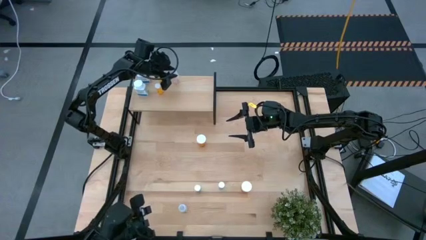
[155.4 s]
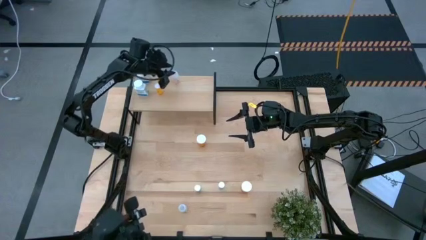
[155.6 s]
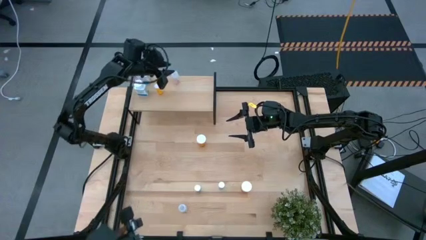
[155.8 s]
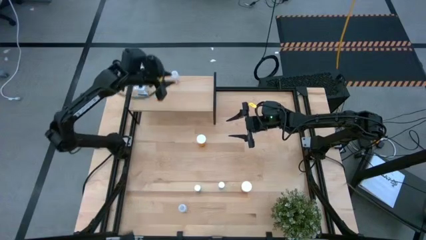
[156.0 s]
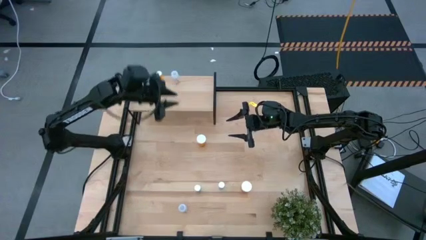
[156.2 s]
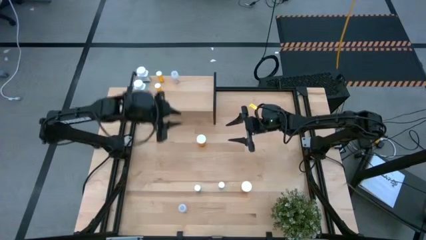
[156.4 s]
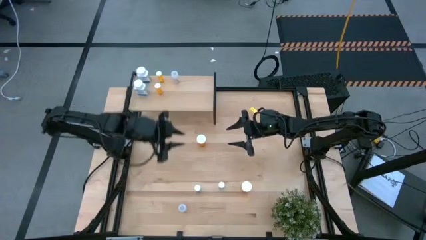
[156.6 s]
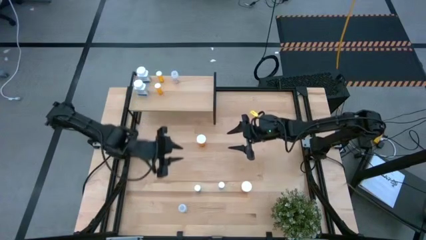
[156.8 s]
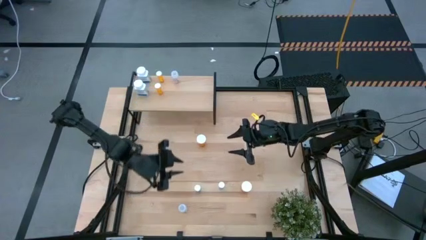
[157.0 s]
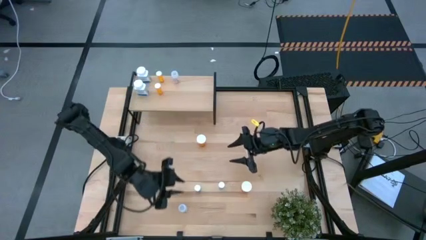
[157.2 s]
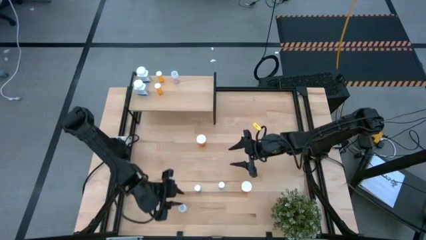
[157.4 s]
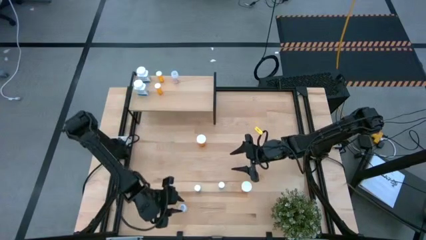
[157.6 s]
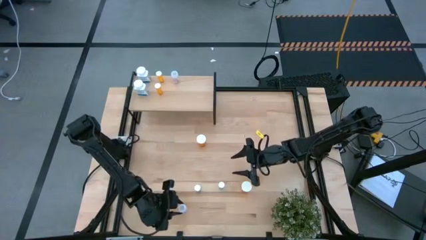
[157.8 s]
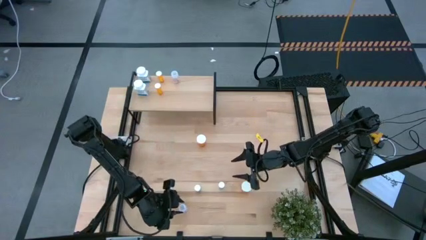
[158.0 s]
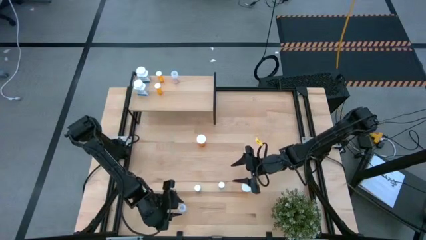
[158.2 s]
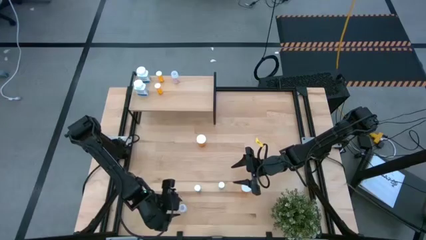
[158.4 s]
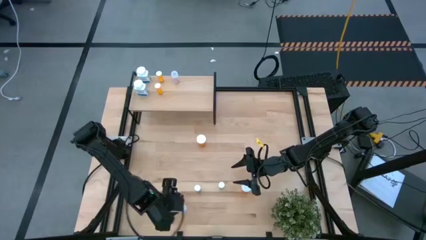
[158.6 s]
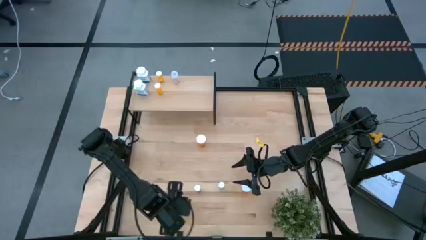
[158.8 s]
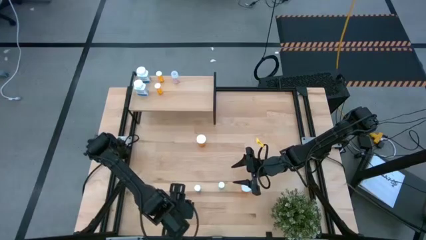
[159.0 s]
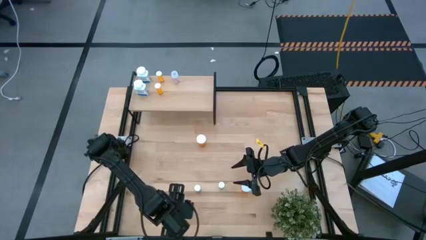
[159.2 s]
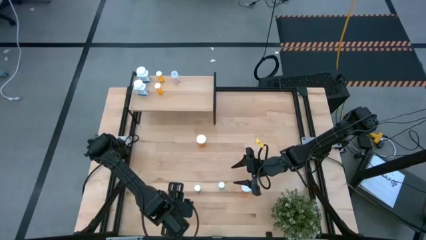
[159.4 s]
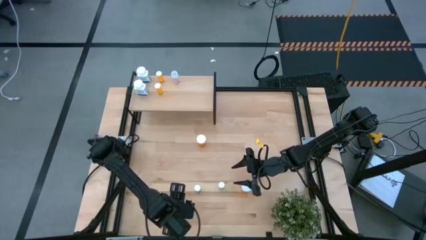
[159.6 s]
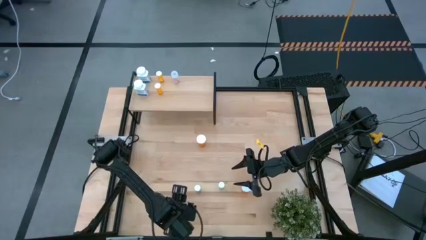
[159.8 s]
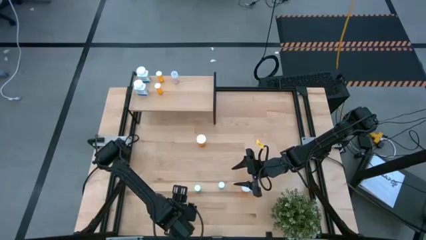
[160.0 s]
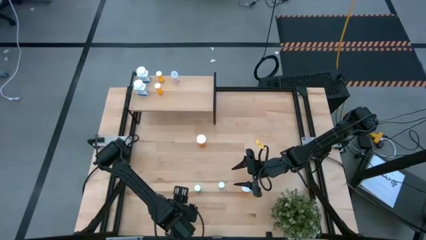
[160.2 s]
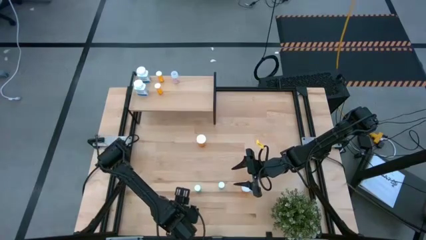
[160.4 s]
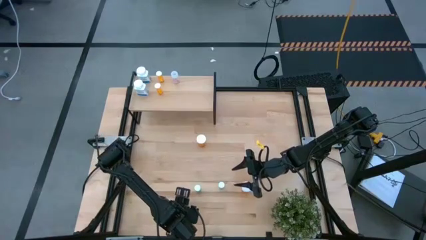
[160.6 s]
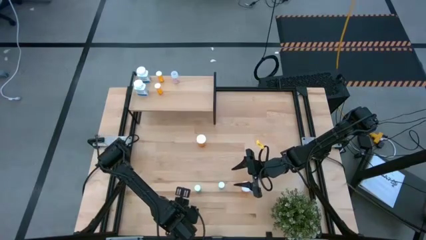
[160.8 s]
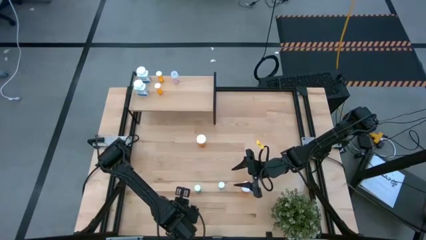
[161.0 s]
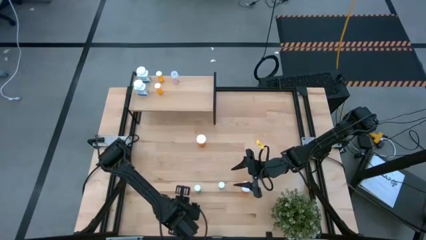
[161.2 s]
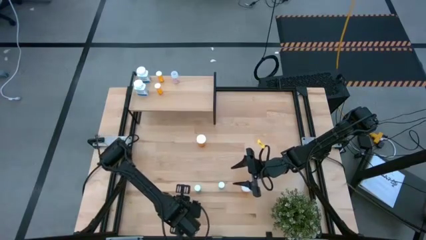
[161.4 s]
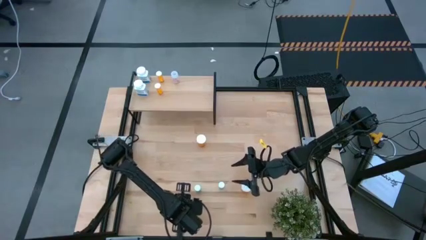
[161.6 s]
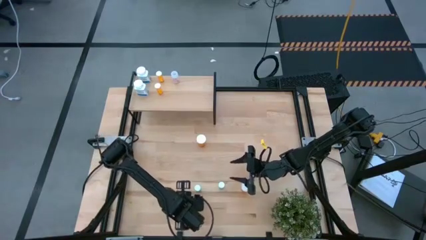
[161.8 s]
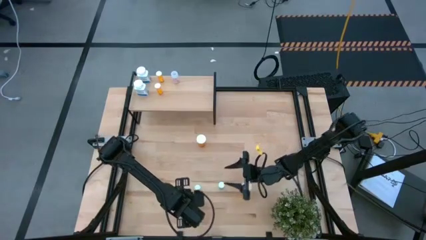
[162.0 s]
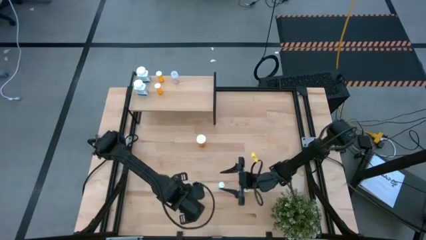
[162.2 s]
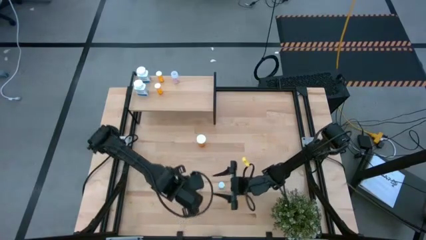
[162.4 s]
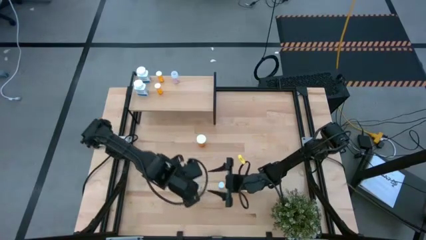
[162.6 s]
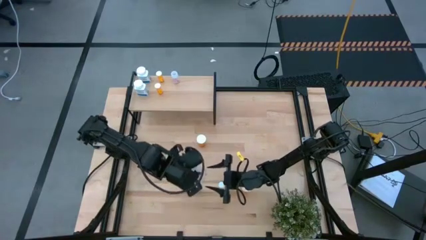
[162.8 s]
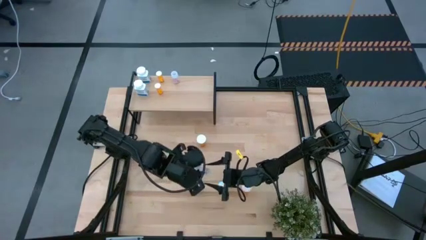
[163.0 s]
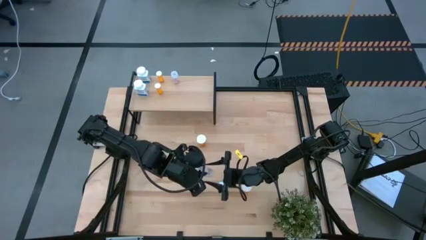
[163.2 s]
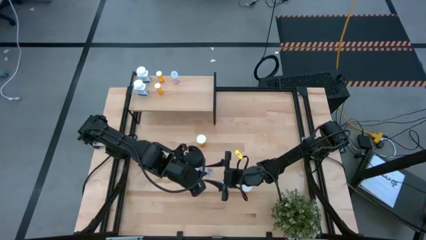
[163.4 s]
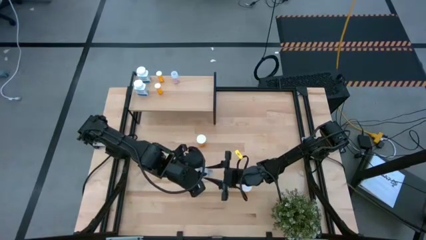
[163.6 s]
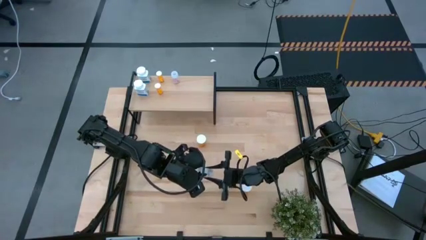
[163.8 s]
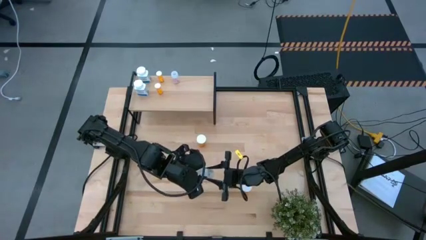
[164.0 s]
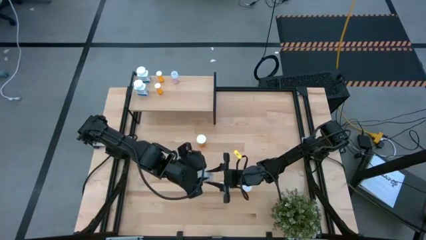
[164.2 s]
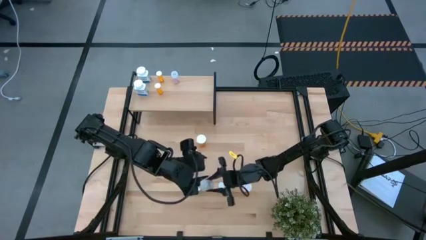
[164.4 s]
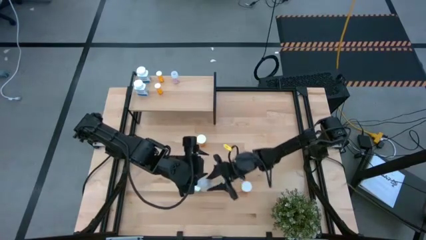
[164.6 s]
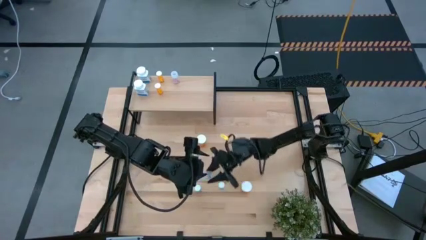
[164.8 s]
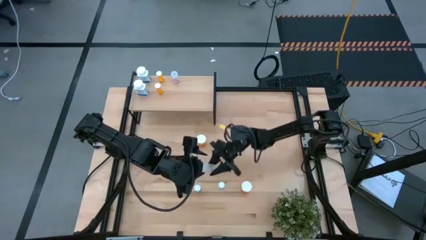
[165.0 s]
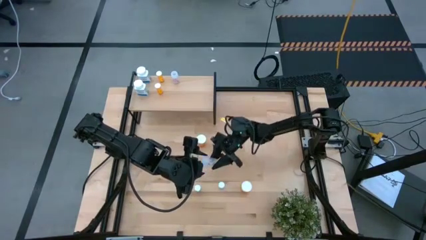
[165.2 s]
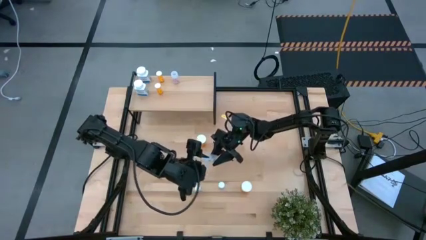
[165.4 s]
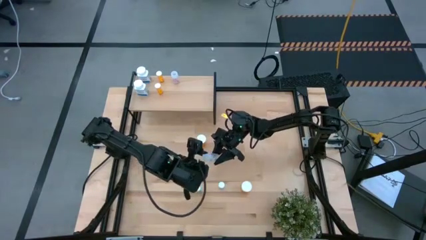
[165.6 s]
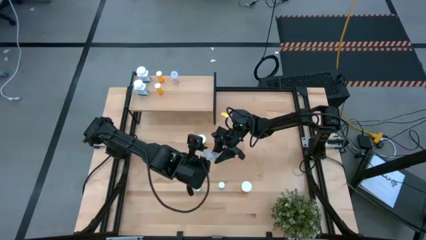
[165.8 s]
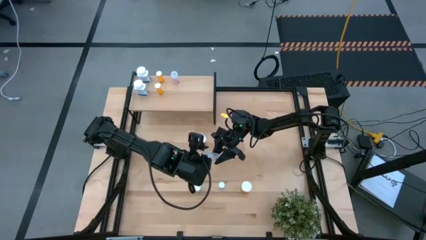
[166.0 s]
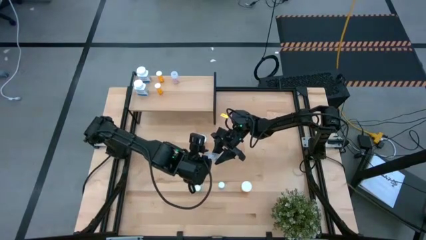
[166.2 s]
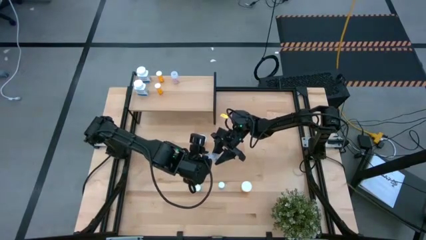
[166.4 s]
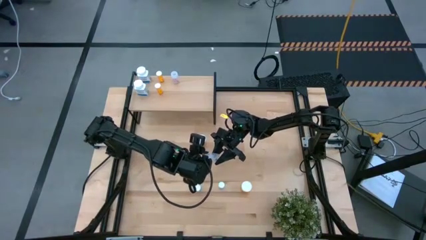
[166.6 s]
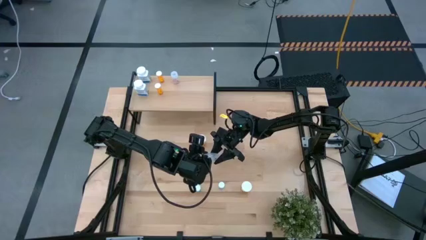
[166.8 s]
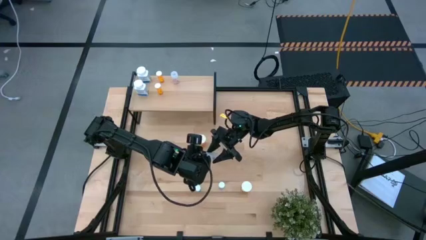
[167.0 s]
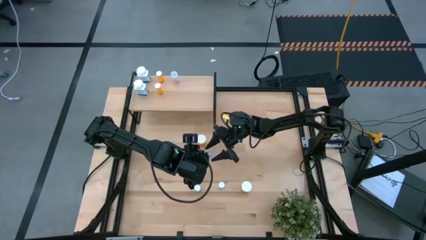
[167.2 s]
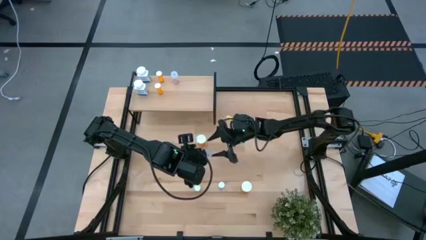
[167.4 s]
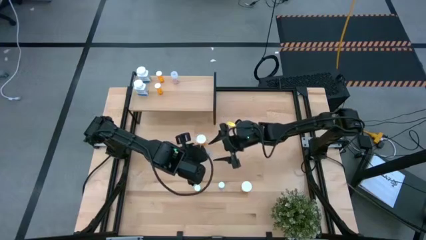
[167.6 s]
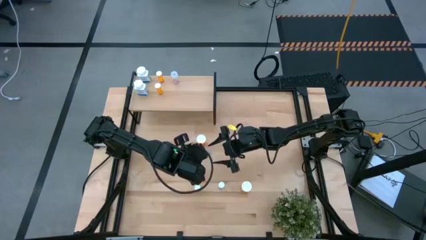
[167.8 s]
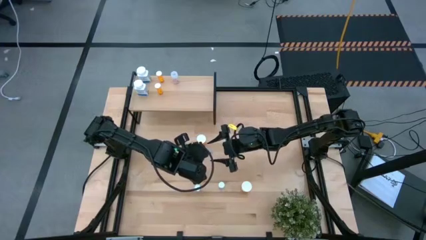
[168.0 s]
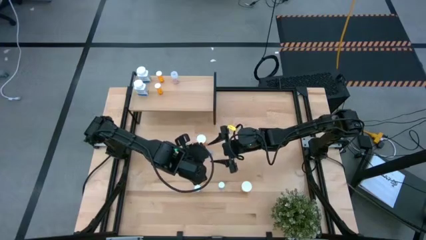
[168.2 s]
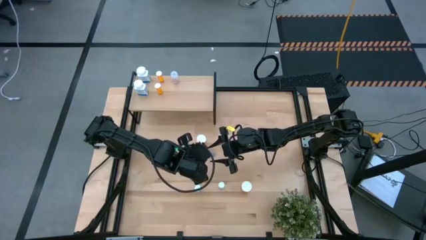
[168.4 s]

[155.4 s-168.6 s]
Task: Pick and place medicine bottles onto shelf by color
Put the transparent pill bottle on the shelf aligned with the other transparent pill bottle

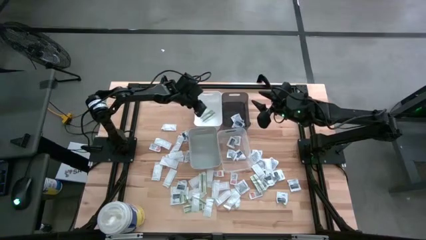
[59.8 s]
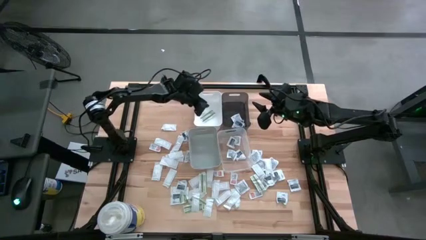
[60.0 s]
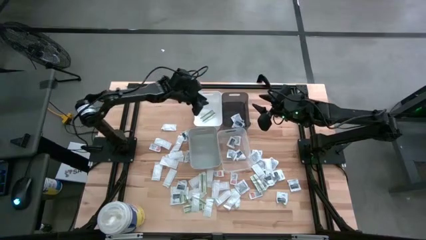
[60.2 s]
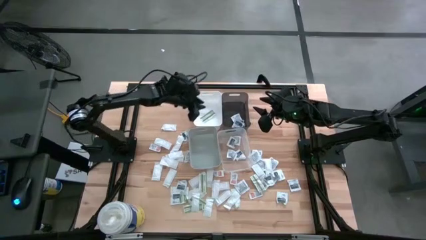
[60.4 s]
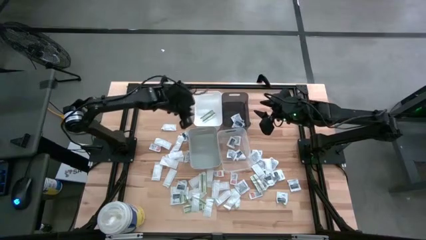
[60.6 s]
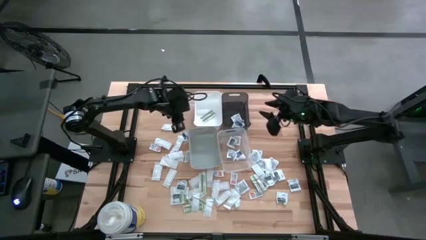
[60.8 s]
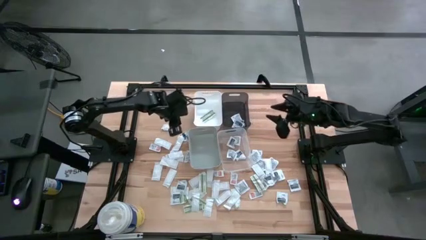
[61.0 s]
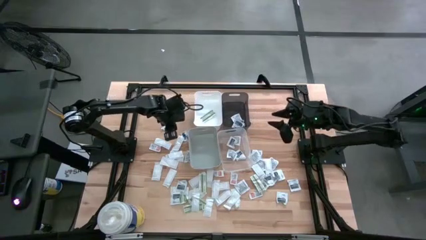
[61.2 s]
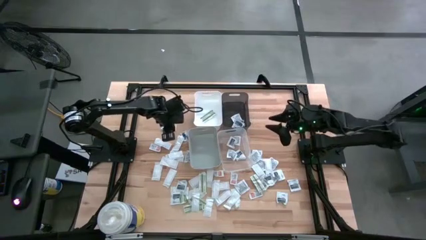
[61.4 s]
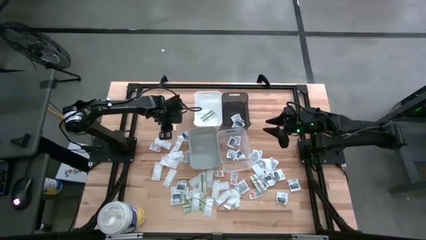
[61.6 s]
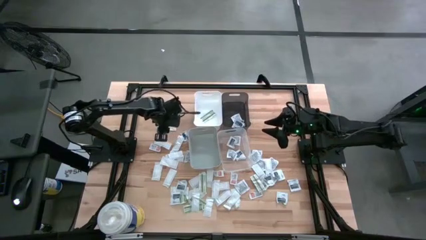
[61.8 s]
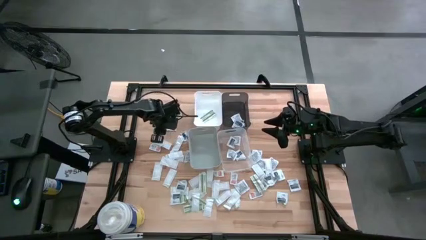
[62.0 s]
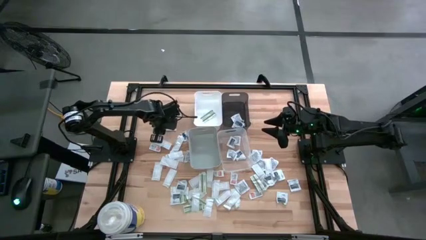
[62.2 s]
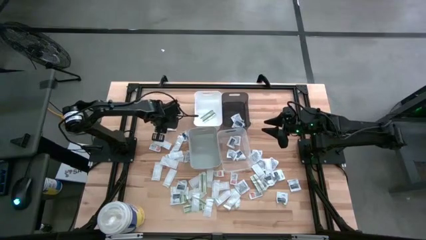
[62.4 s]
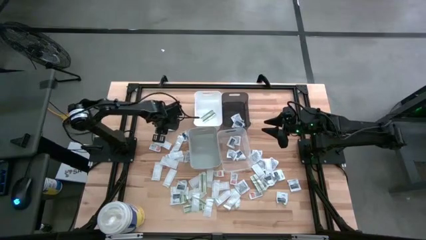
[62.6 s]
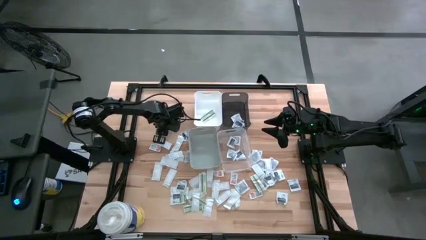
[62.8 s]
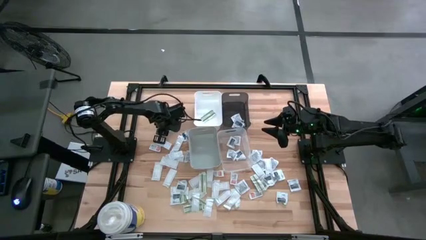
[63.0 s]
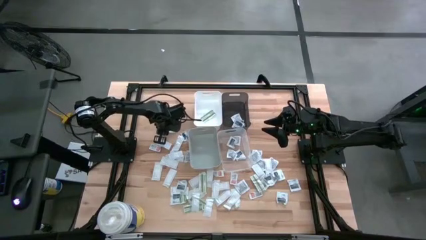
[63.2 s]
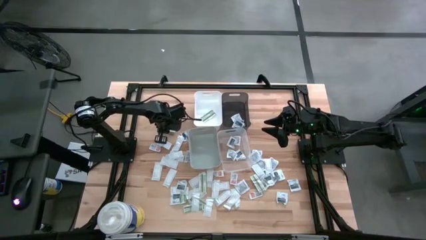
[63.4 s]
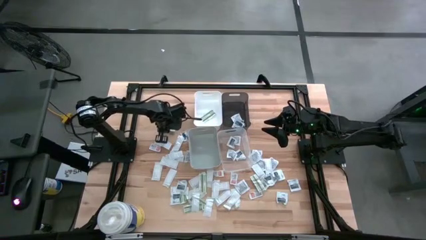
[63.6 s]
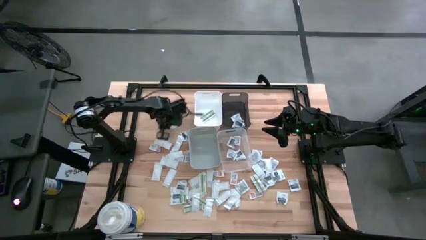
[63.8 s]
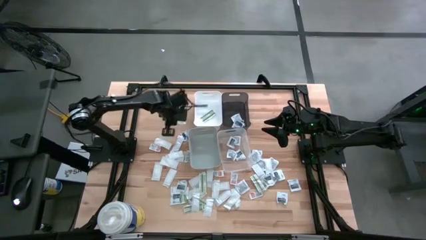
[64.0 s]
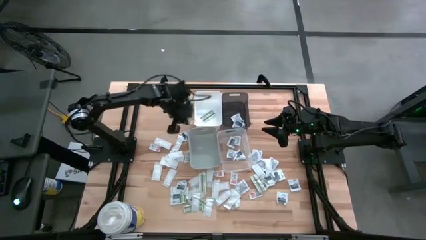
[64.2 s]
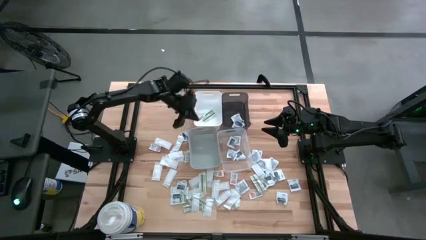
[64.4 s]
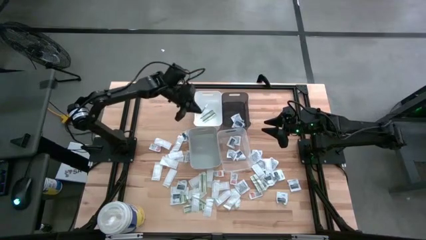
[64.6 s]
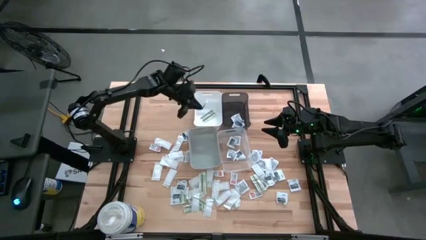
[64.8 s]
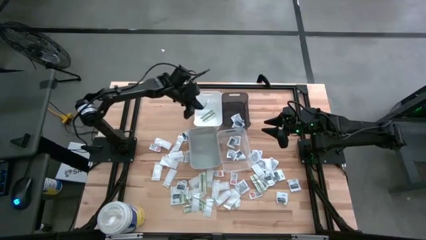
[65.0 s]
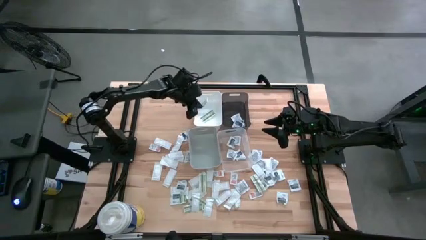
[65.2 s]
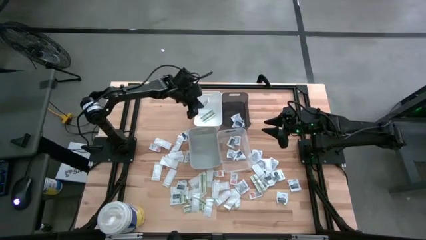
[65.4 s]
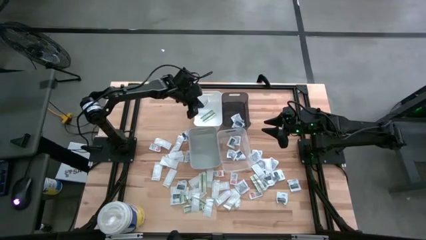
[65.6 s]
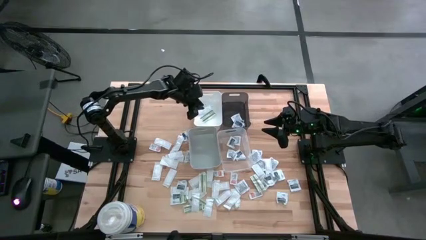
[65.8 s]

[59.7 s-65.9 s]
Task: Pick & Place First Aid Supplies
Put the green bandage pack into the white bin
